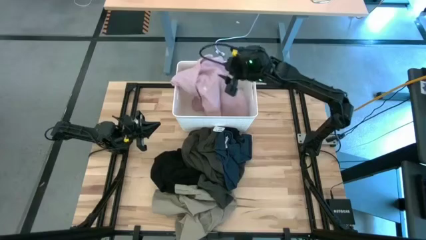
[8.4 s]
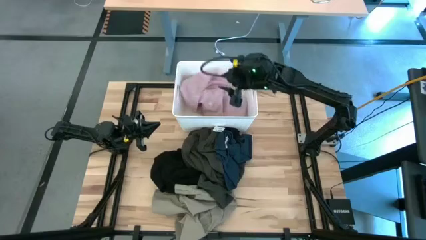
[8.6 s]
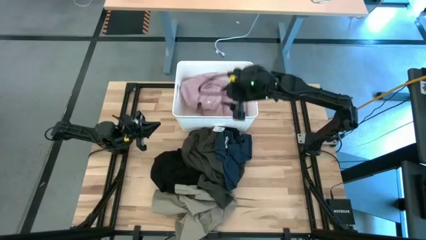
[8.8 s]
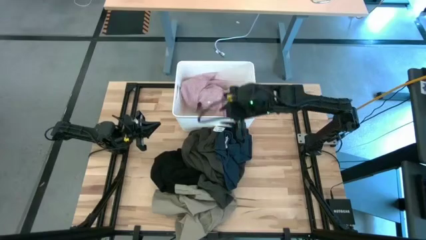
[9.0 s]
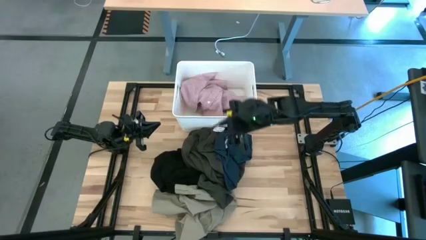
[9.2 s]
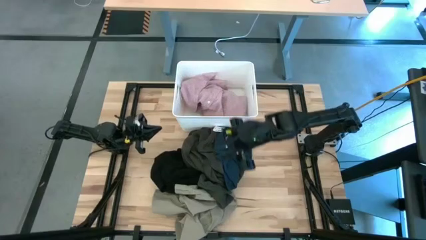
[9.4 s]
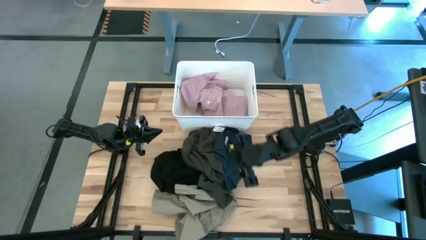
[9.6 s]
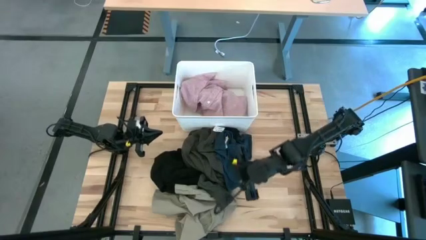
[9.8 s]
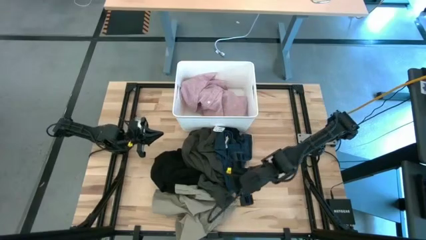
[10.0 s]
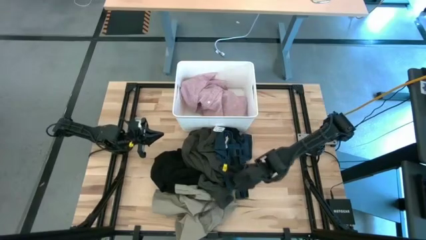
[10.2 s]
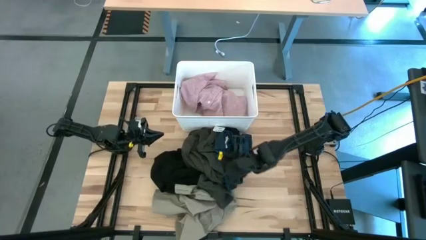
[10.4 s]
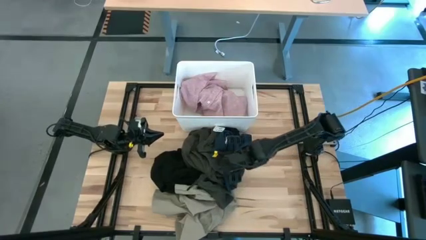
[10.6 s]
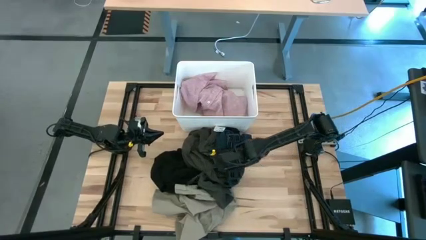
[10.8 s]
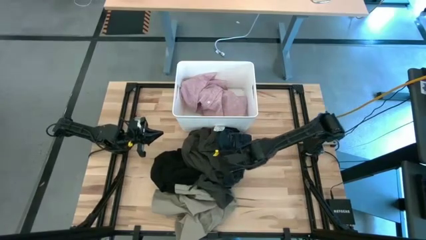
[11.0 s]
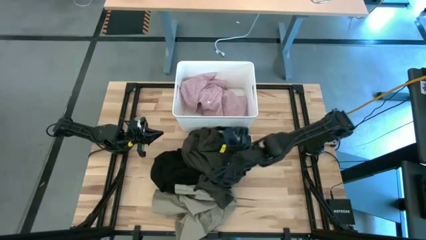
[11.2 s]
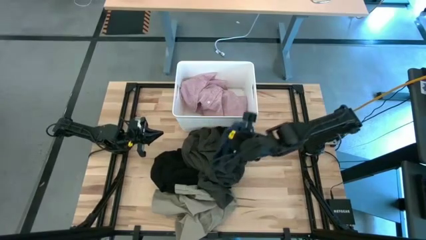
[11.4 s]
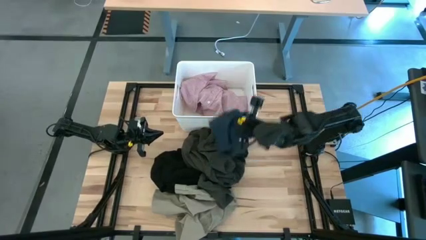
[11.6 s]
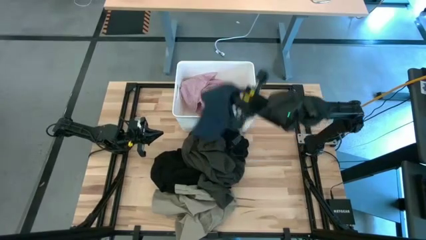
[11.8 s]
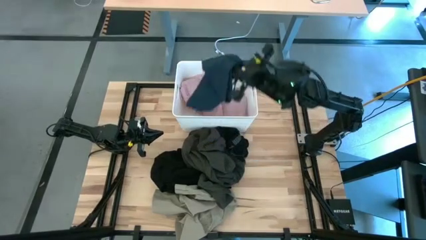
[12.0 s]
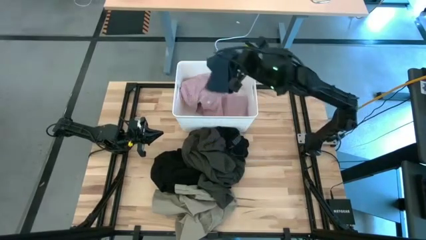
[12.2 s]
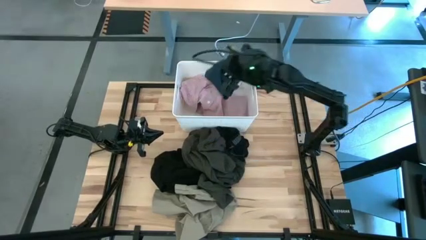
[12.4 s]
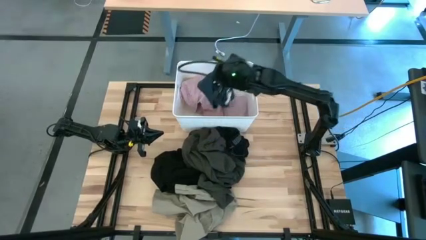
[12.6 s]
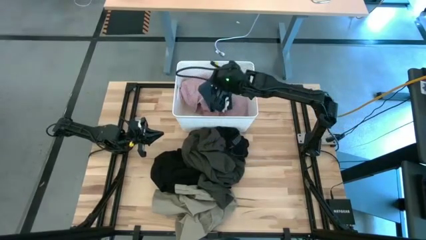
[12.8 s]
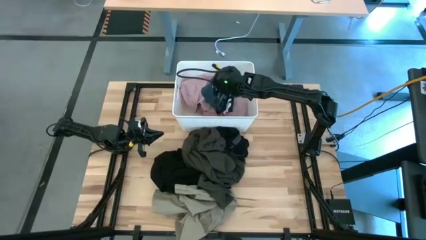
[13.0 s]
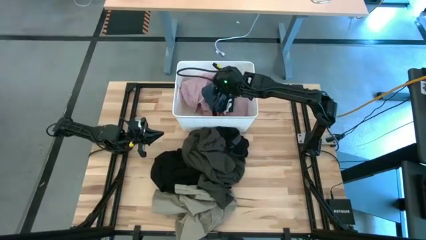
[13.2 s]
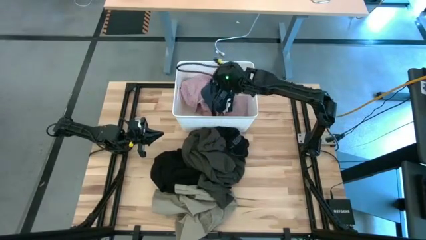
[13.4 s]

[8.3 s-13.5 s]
Task: Sort clothes
Put the blue shorts into the white laundry bin

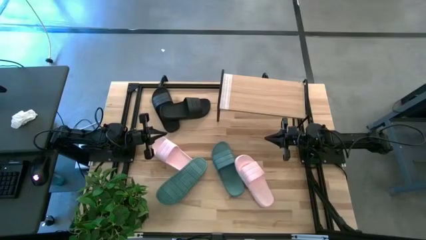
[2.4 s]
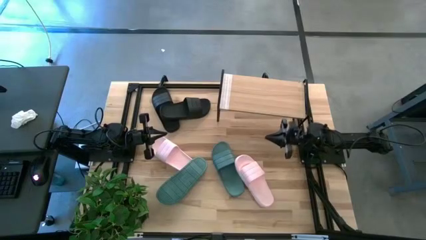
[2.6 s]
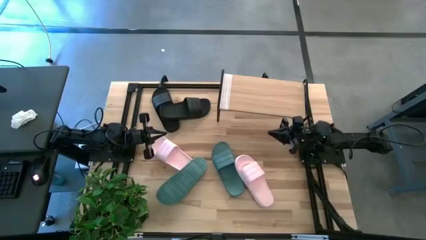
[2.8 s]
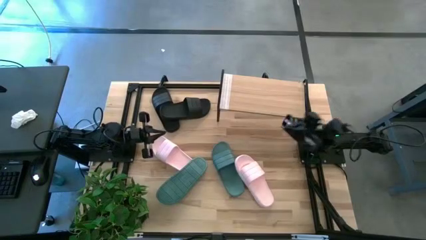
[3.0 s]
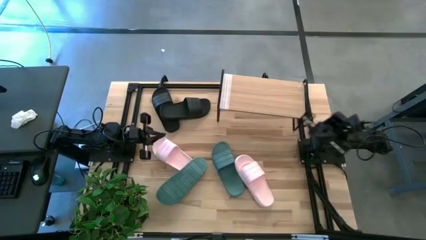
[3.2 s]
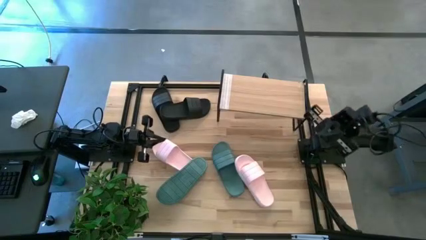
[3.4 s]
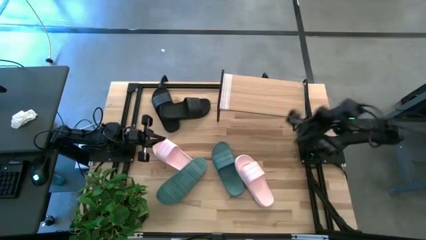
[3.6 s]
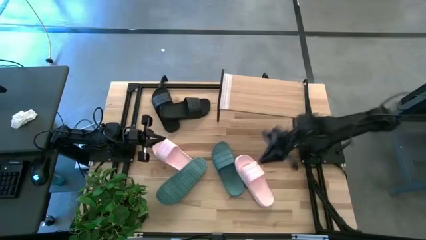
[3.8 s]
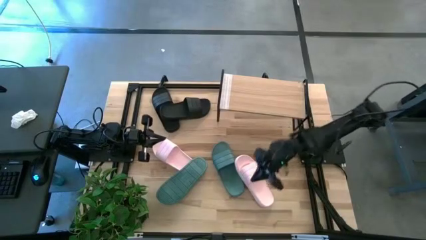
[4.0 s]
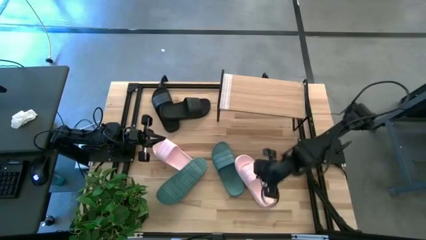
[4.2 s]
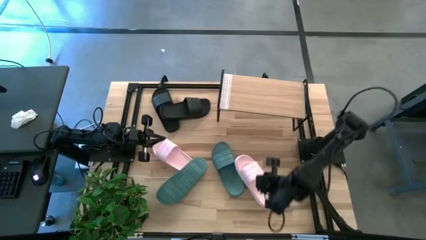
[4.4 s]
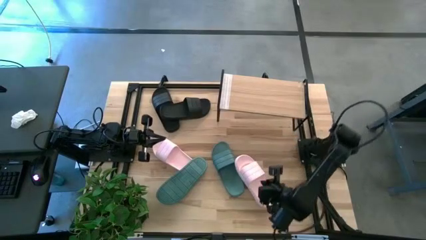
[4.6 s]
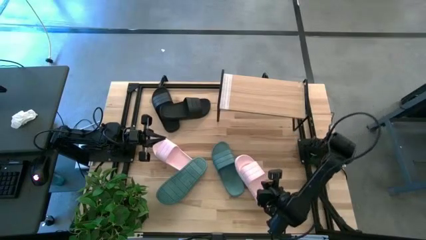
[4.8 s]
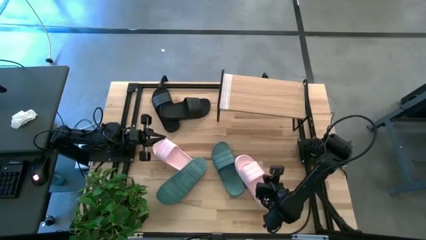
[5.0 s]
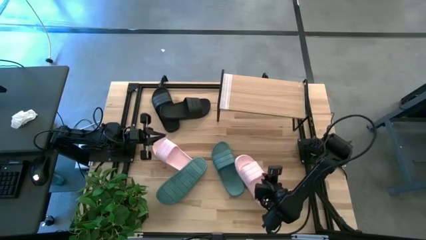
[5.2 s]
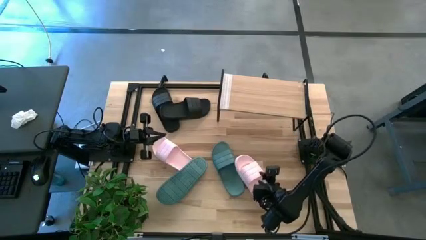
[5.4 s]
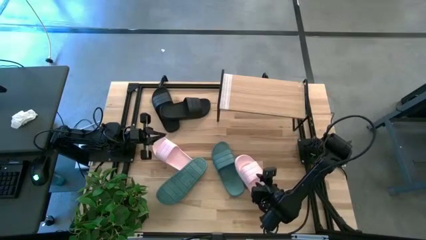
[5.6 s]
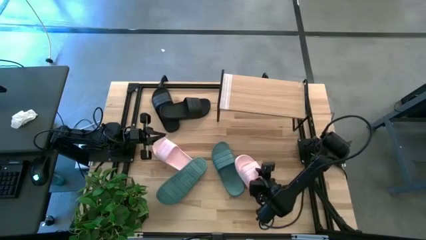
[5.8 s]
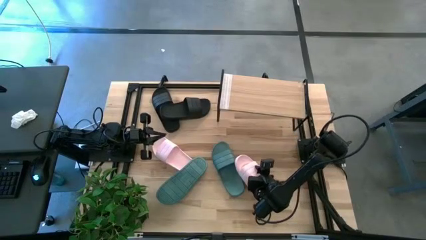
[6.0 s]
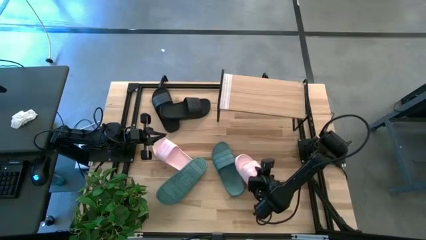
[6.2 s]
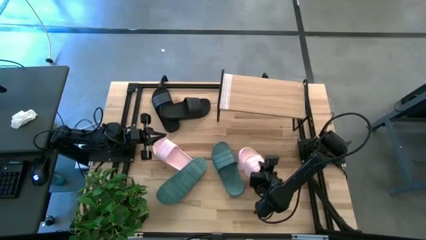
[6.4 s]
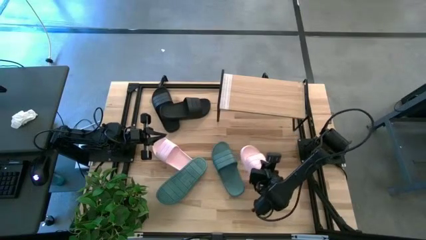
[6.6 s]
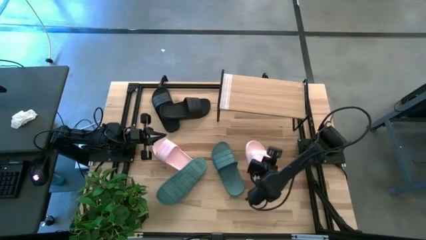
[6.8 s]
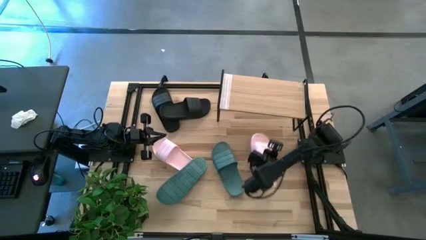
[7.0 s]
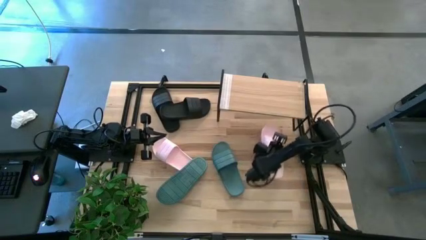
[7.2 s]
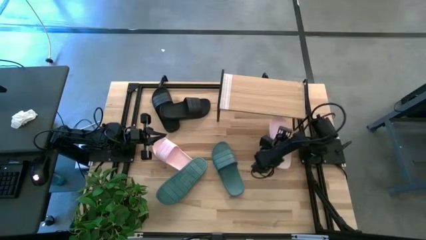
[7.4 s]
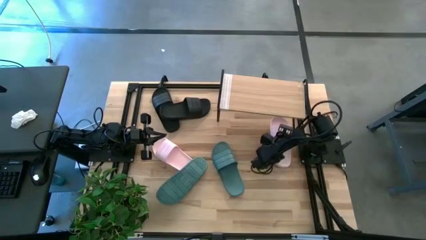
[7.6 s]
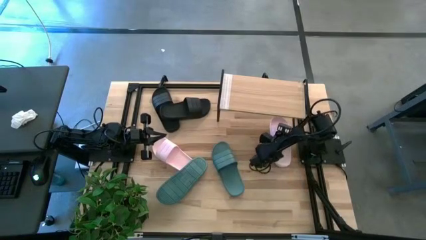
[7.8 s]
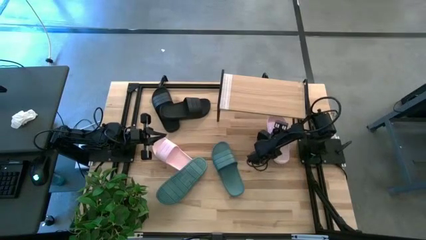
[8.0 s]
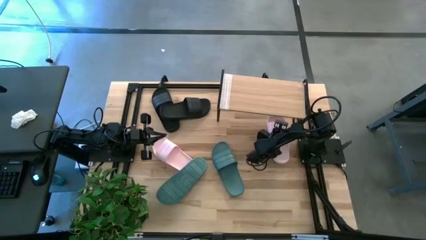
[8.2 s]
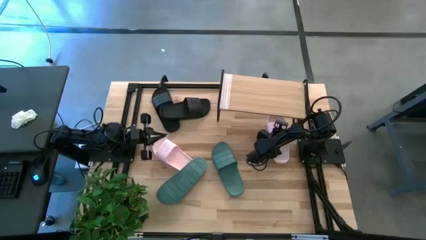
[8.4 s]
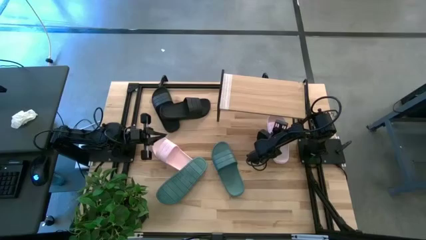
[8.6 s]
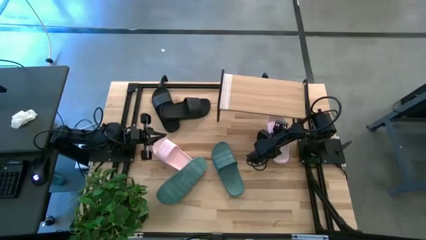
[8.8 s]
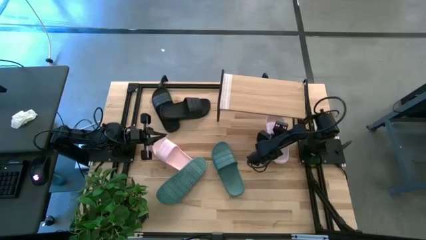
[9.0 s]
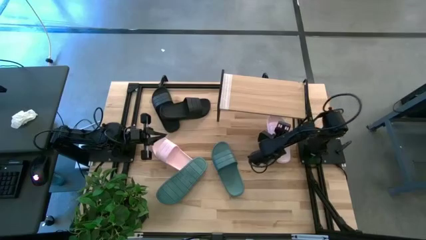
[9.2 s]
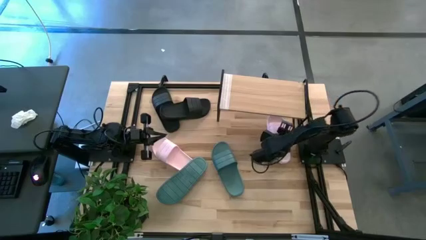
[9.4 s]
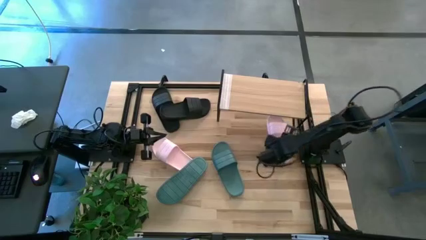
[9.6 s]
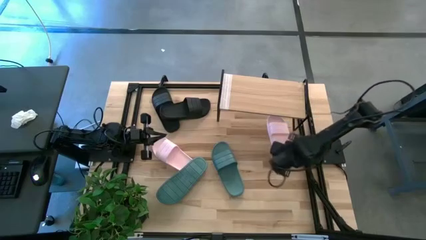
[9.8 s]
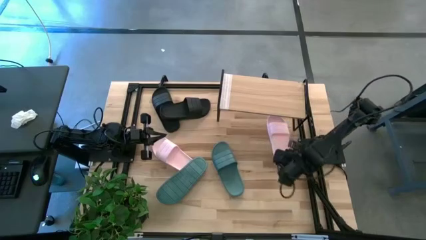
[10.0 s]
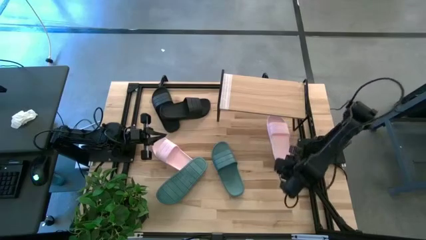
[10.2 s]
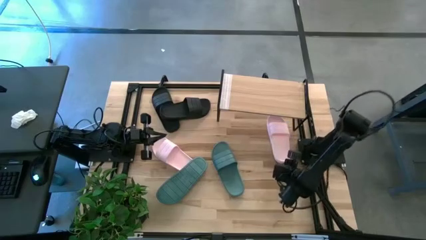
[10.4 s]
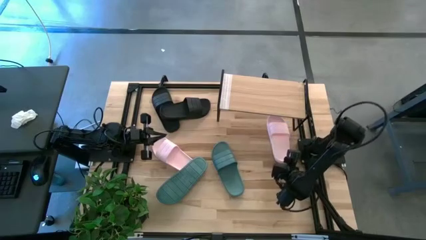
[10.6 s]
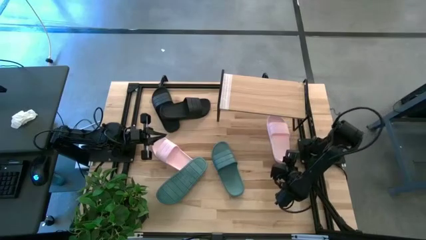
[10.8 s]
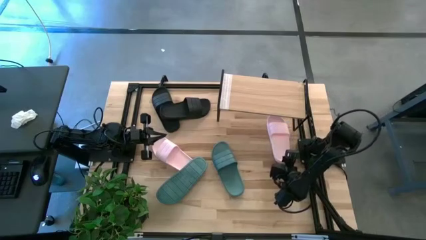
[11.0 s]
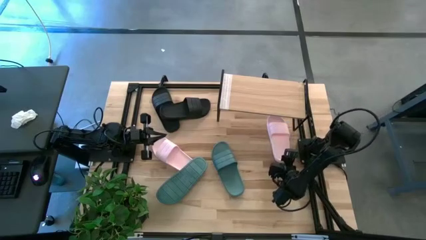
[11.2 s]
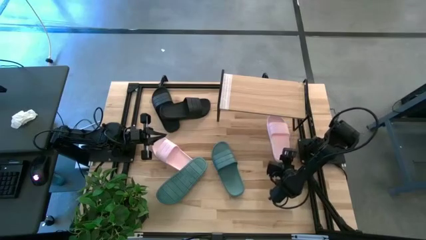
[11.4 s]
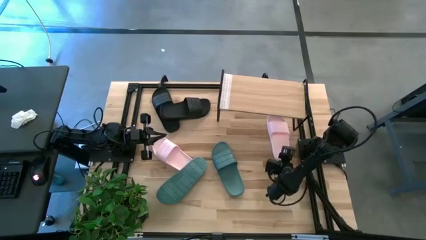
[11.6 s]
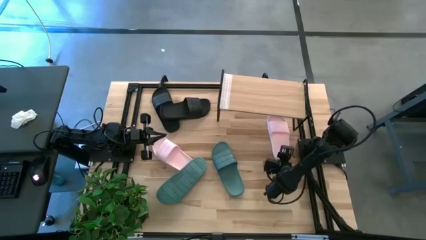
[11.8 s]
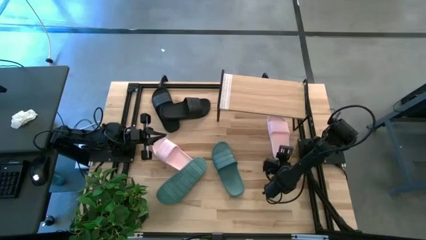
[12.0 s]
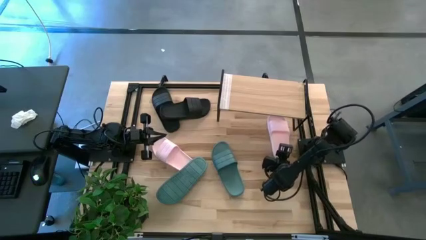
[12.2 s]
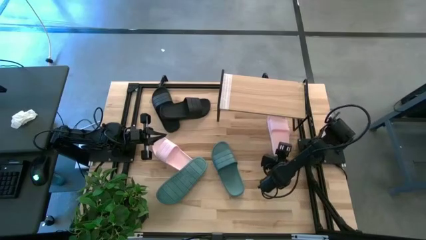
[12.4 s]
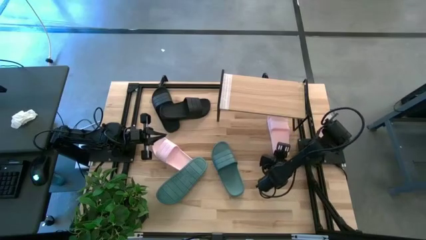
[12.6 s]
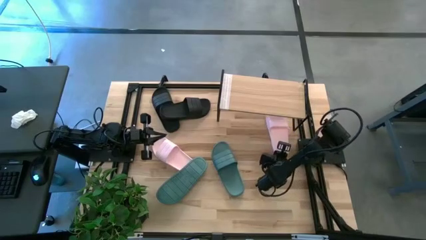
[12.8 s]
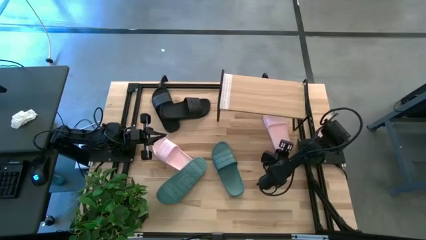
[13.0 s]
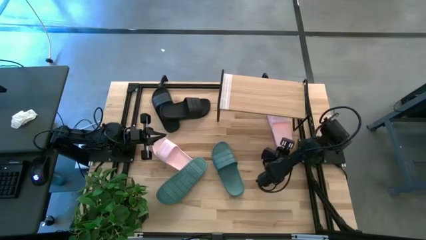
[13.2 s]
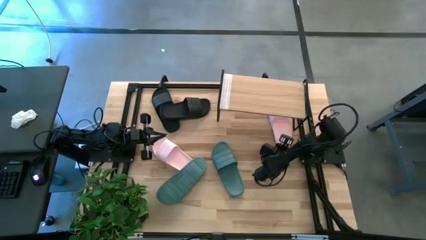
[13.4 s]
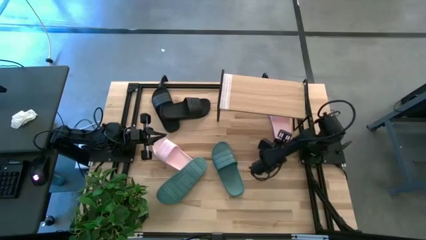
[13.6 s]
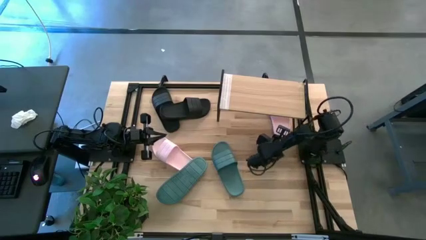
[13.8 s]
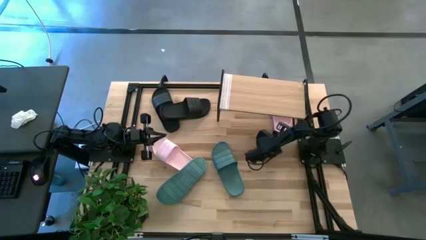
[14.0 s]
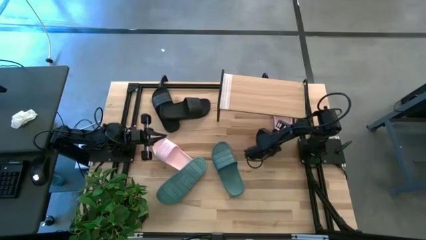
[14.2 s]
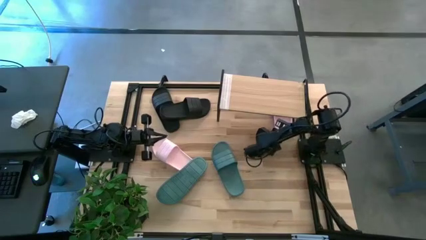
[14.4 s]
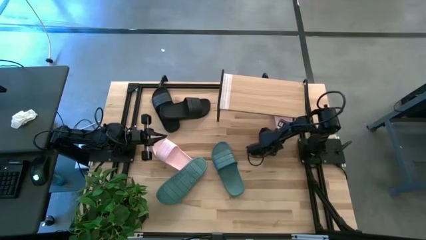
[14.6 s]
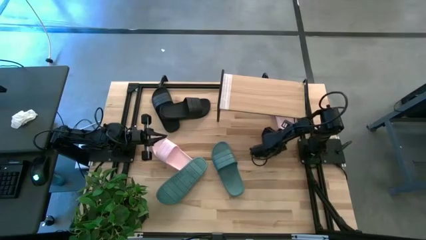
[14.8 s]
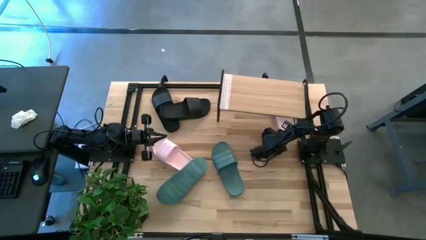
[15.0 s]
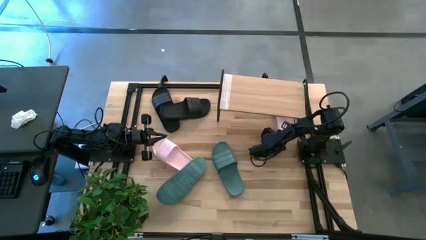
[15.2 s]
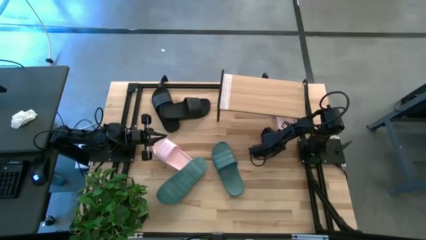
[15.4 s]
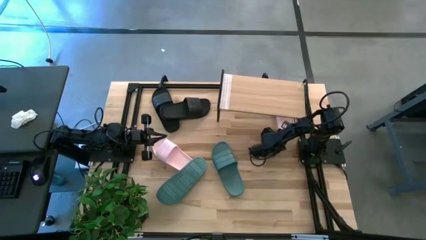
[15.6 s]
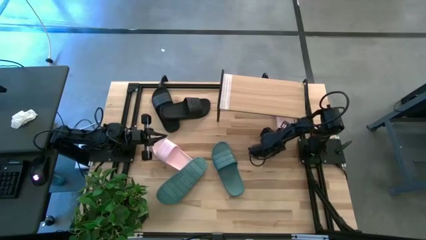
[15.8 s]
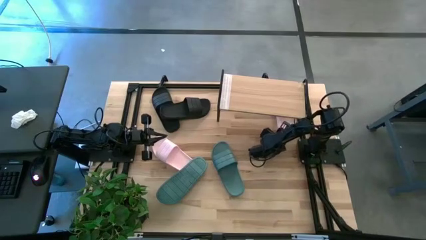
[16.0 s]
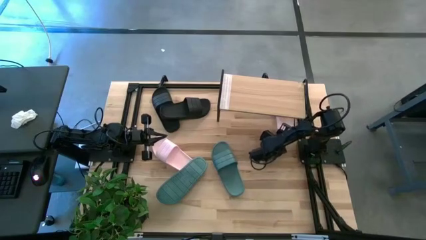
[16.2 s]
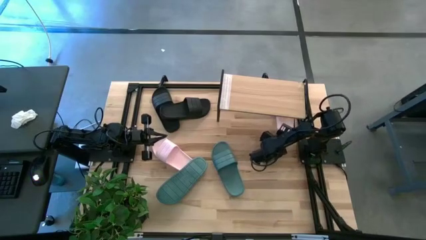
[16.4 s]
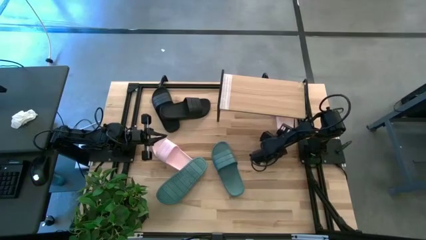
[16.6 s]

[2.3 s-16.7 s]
Task: Pick and place slides into the shelf
Put the right pink slides under the shelf
